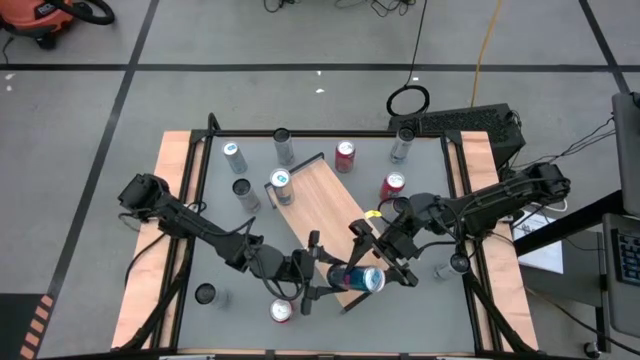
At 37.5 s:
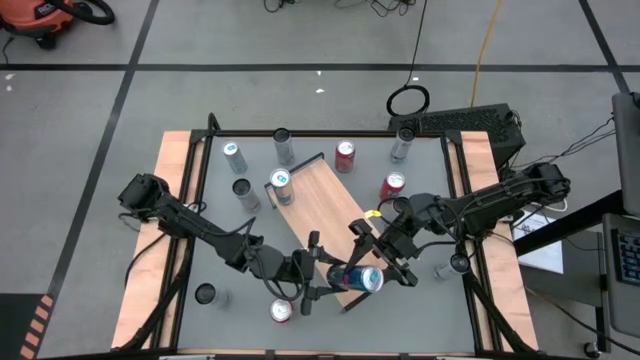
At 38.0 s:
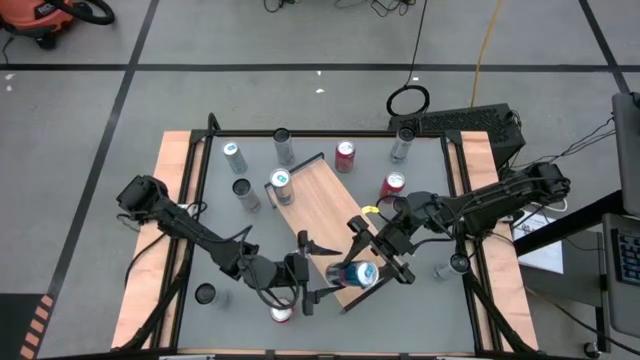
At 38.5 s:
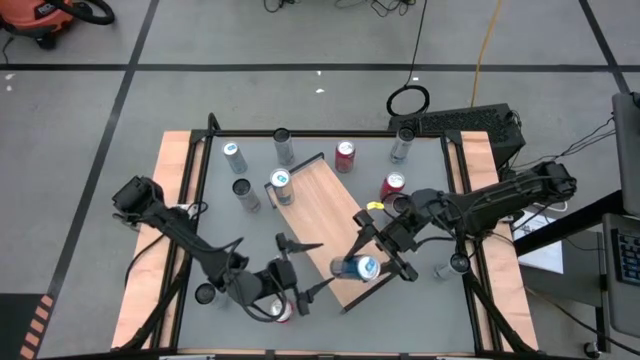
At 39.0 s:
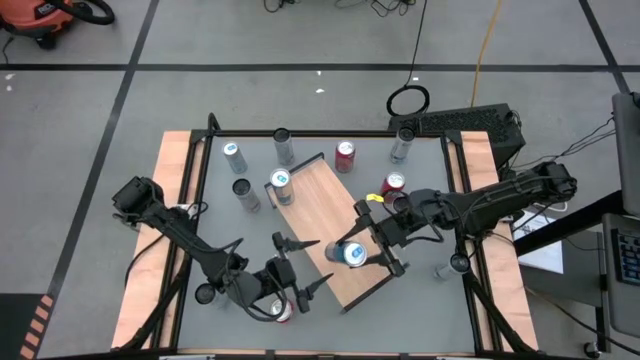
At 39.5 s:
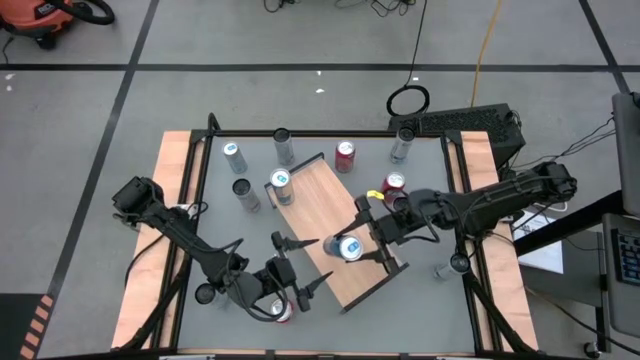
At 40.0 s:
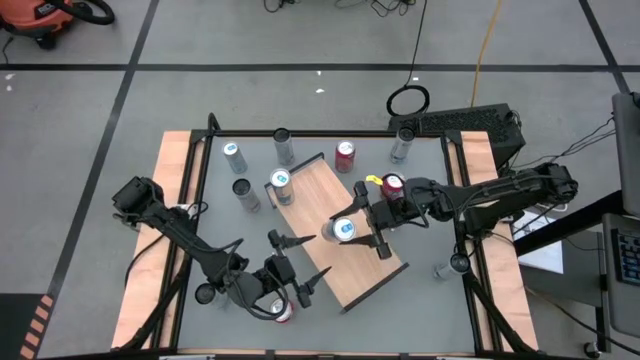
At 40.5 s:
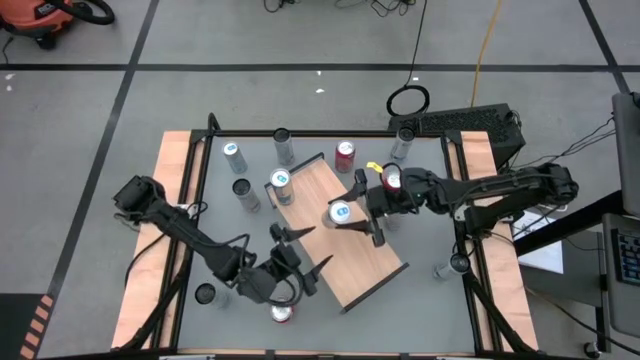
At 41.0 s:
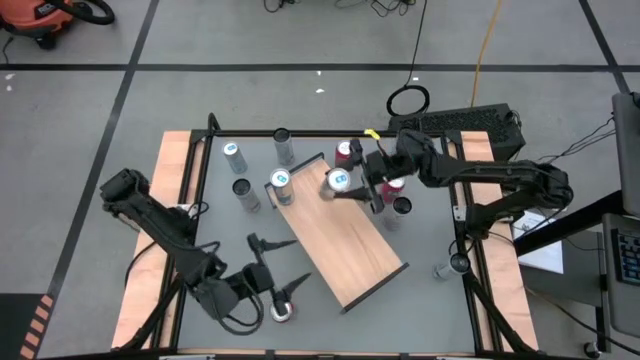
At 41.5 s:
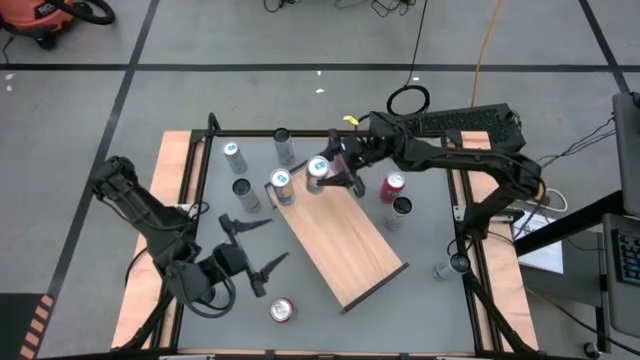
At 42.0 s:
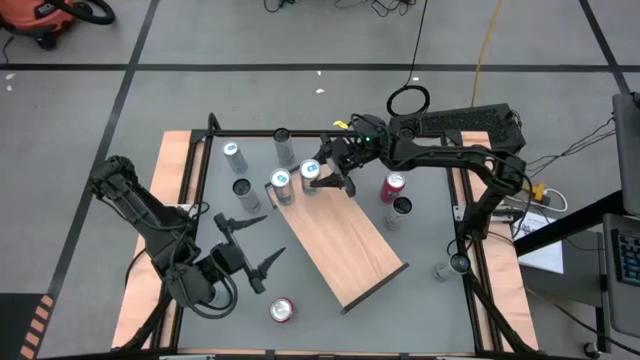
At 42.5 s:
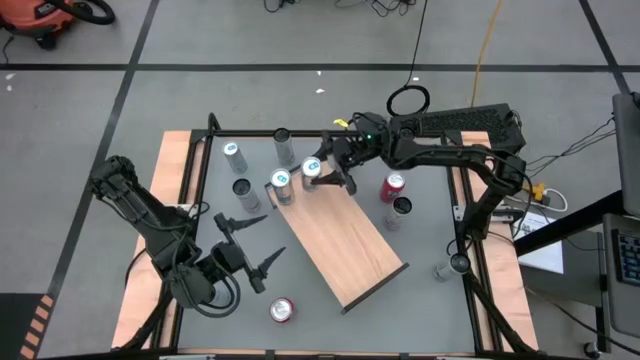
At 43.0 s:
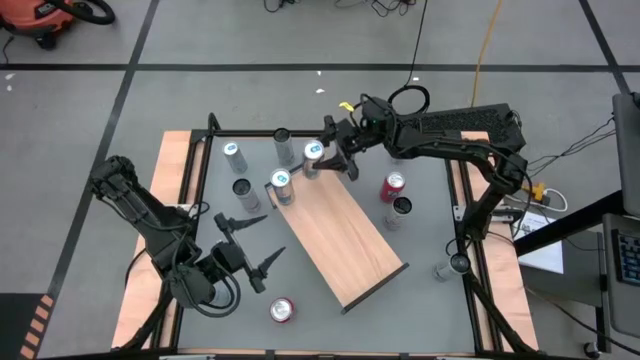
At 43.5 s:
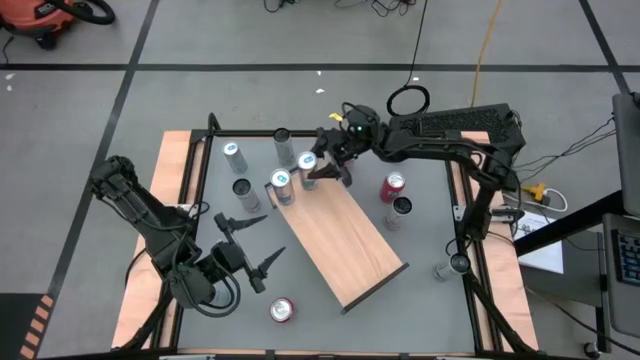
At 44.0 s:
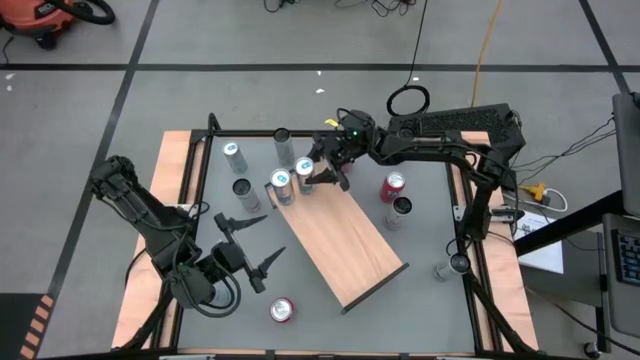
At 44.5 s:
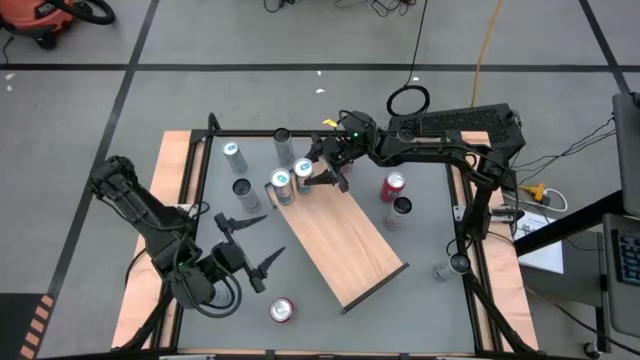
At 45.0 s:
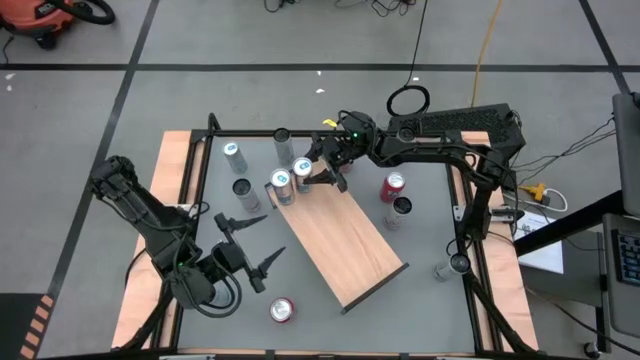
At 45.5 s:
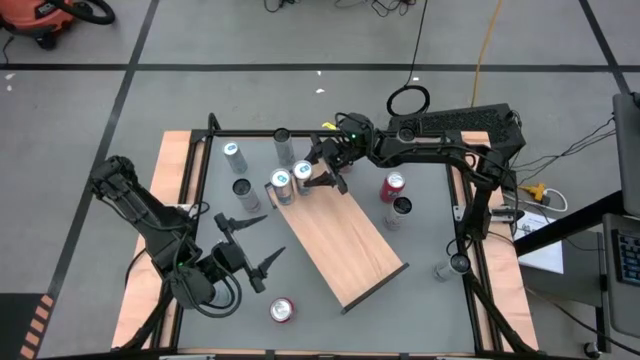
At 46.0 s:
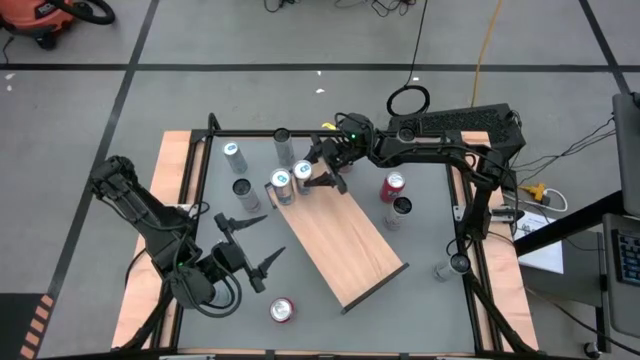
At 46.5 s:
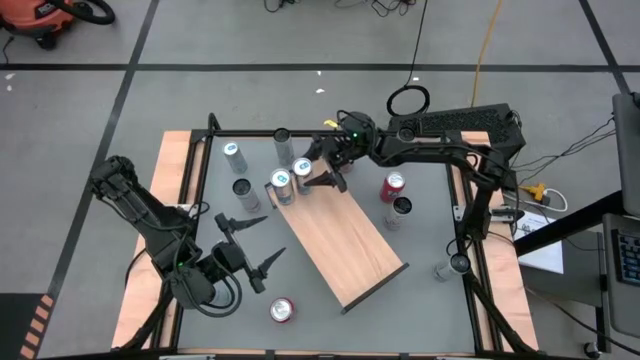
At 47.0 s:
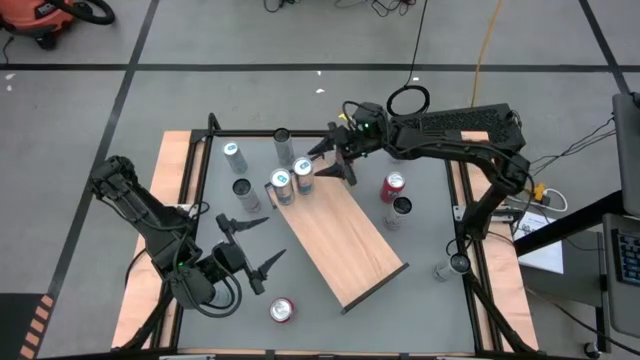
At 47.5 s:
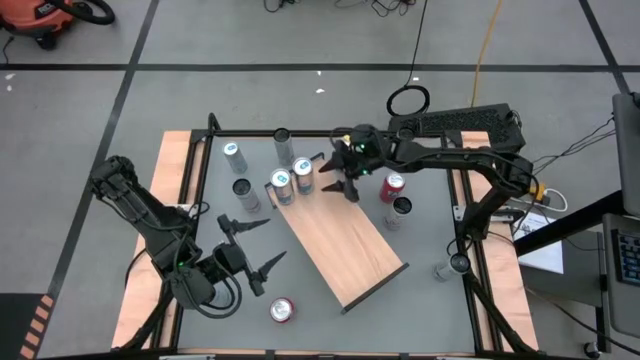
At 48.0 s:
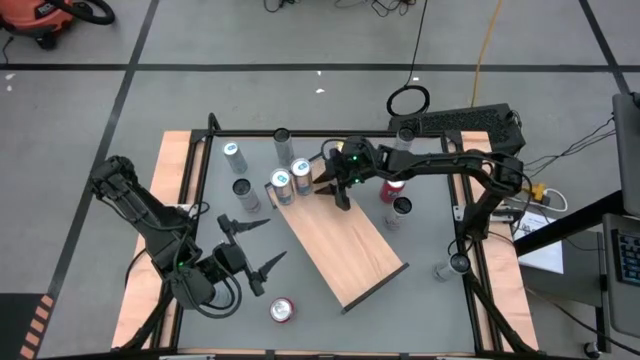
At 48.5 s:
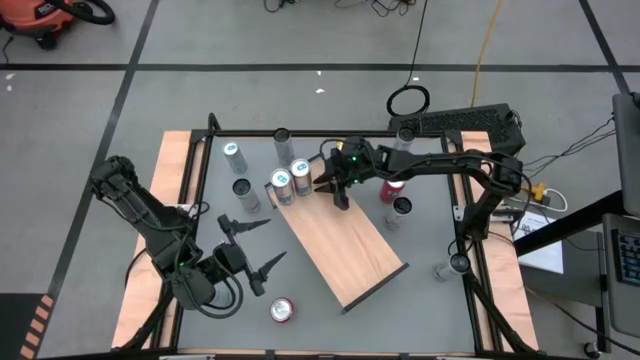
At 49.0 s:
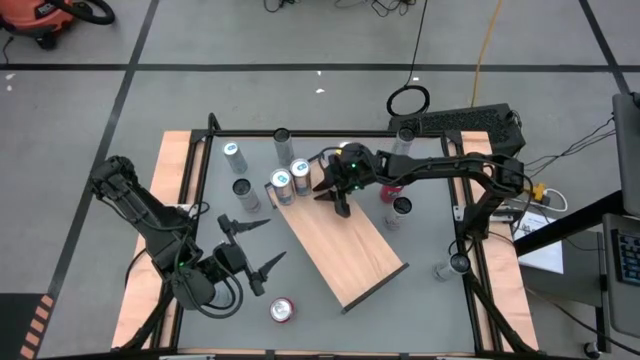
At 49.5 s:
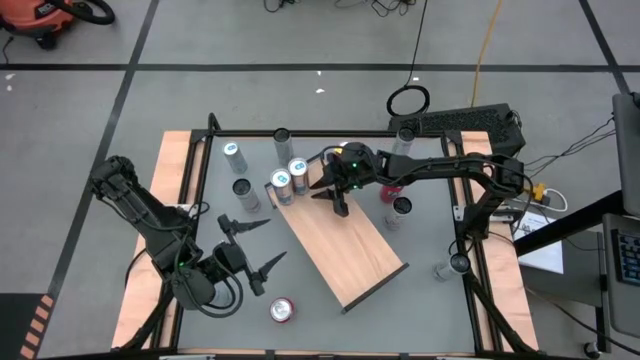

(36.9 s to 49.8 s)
Task: Place canned beverage on shelf
Put the bottom silver soda can on the shelf aligned with the other silver soda can

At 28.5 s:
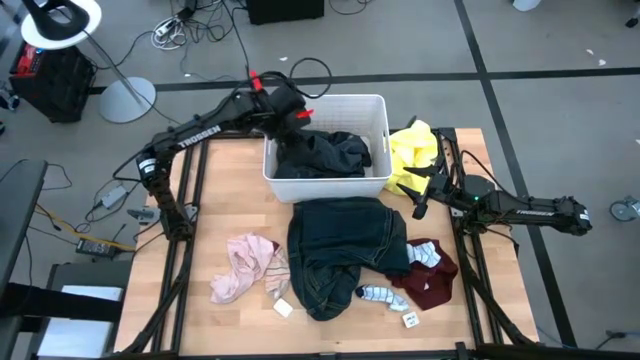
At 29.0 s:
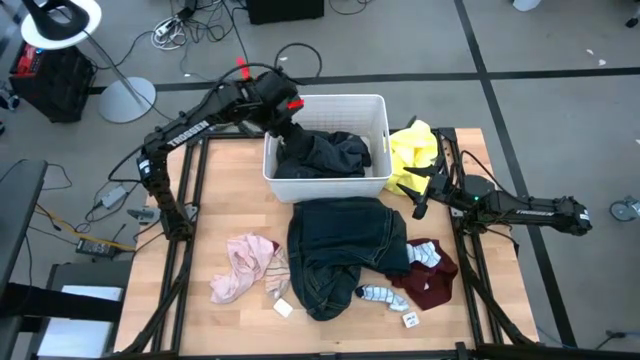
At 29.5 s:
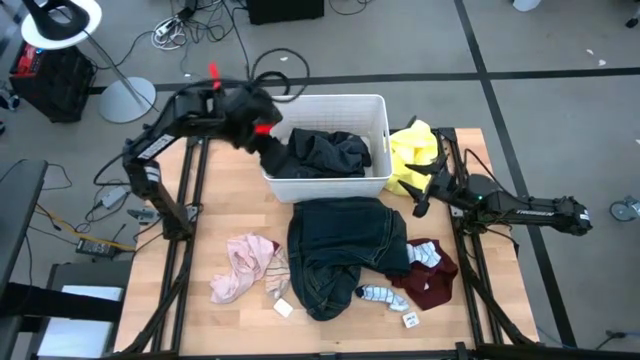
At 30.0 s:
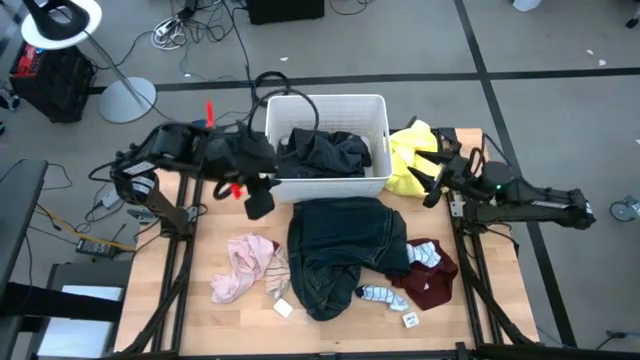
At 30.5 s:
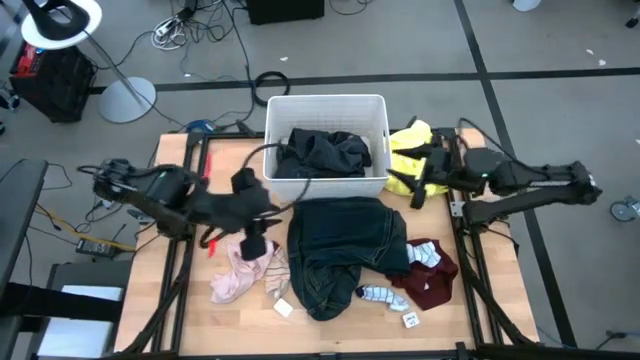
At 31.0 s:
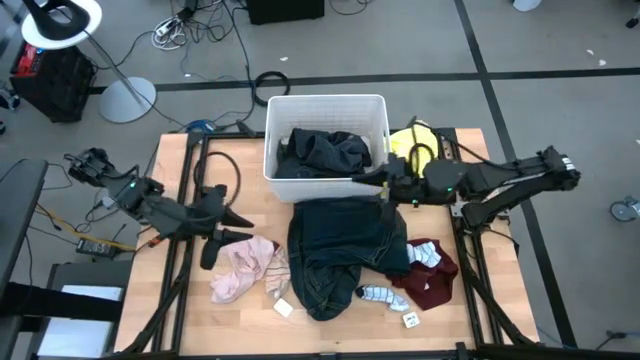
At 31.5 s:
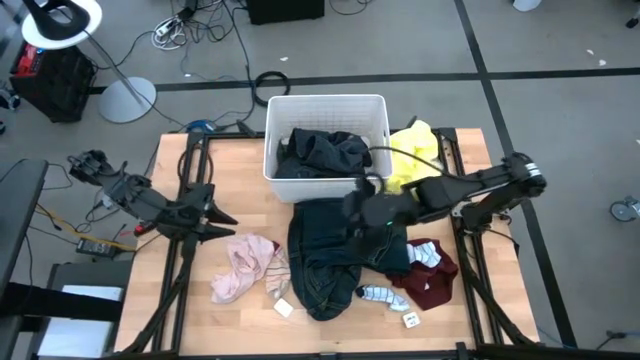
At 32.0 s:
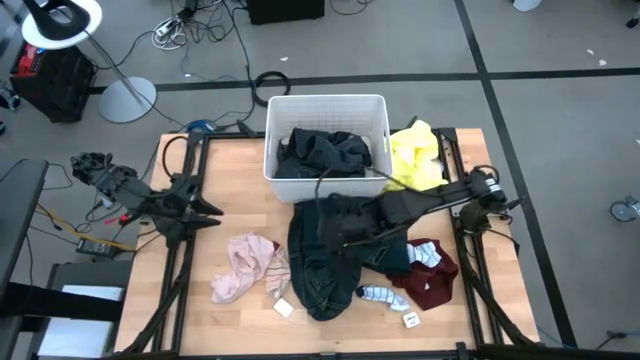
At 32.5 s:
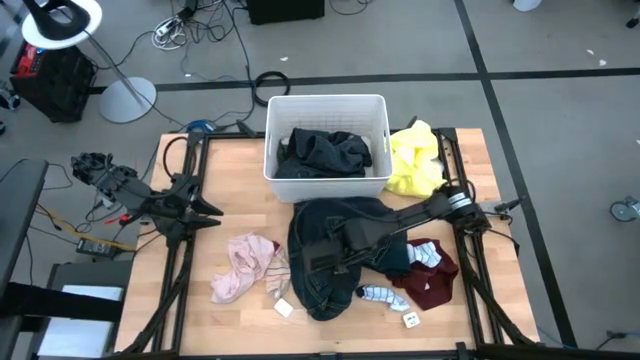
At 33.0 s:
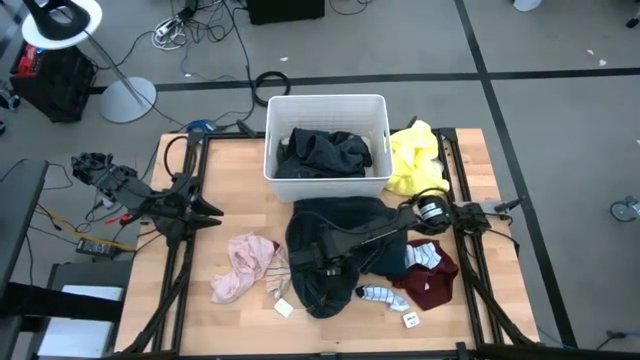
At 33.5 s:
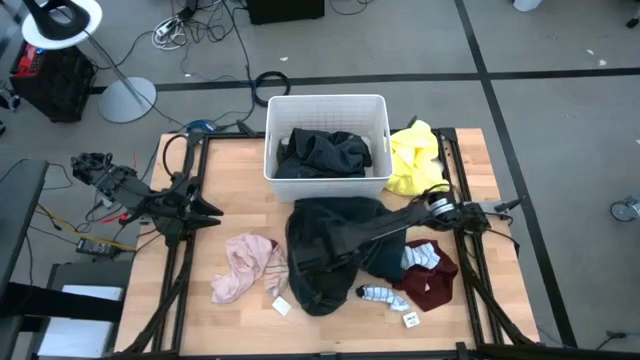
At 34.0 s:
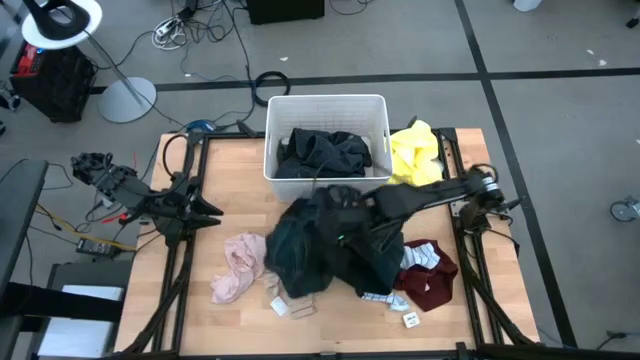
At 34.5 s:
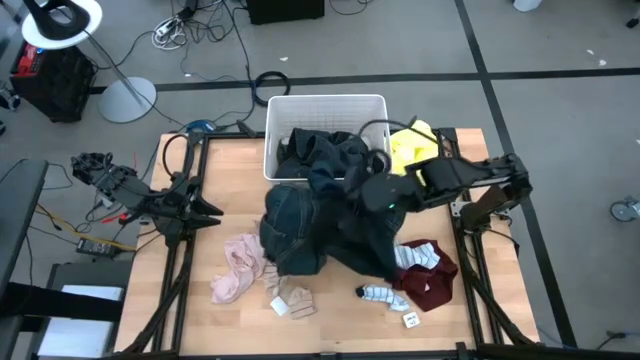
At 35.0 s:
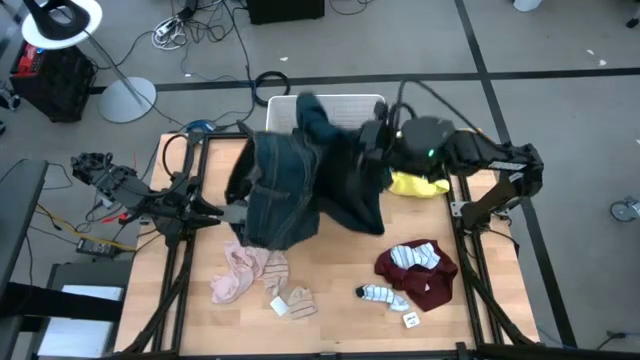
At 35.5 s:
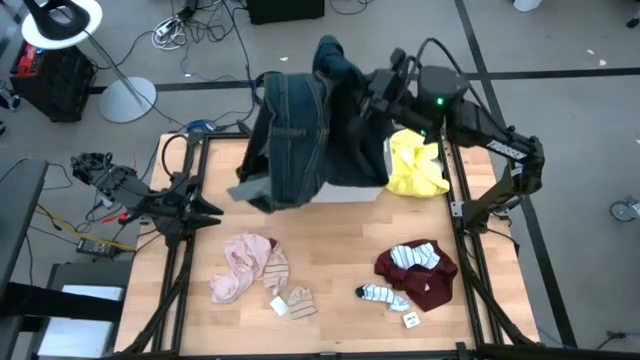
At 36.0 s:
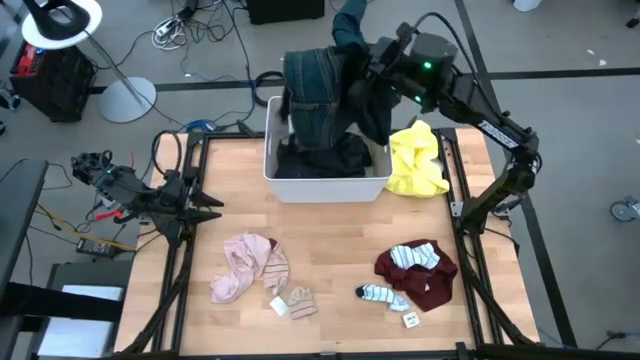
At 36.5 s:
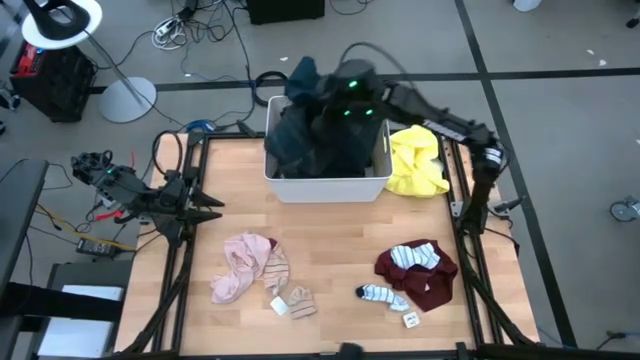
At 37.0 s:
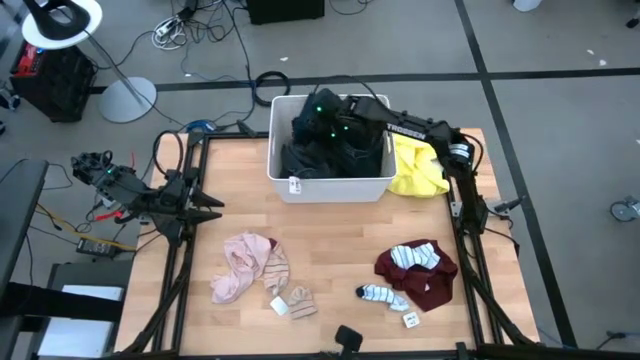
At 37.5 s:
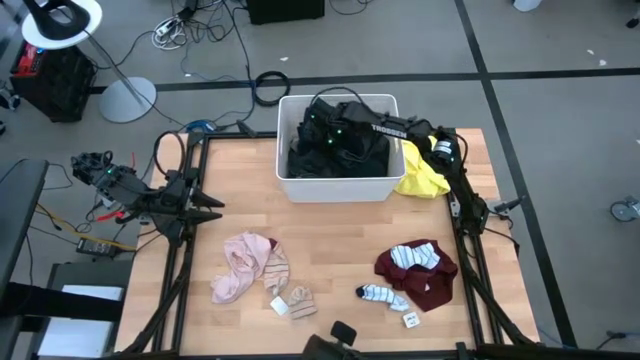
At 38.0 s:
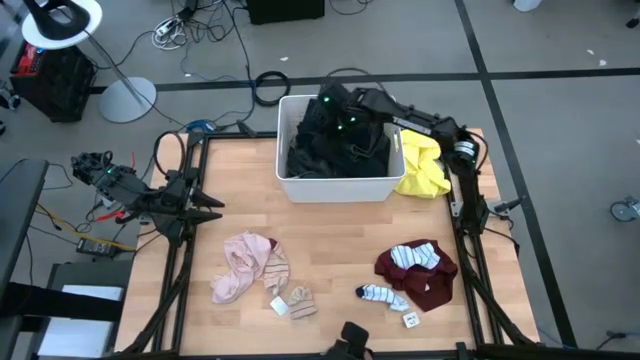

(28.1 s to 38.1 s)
Task: Sort clothes
Put the black pants into the white laundry bin
